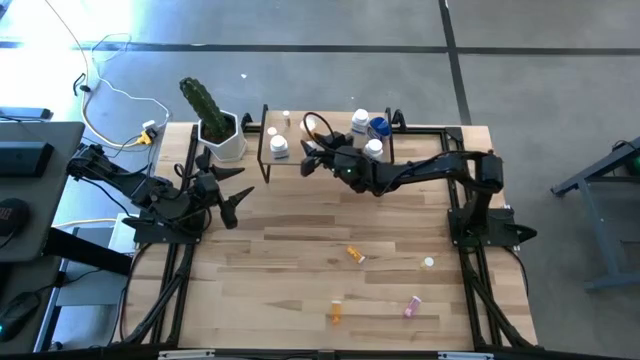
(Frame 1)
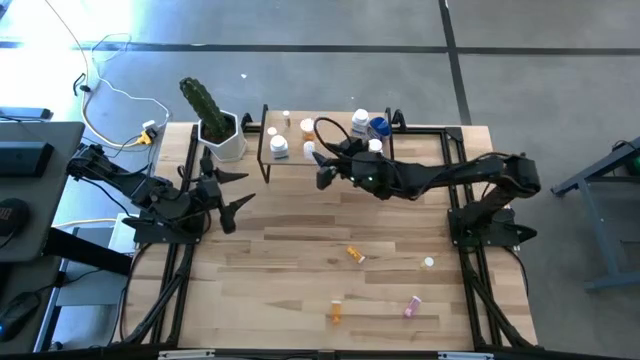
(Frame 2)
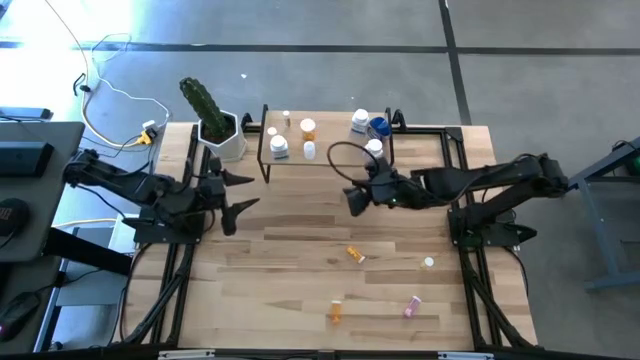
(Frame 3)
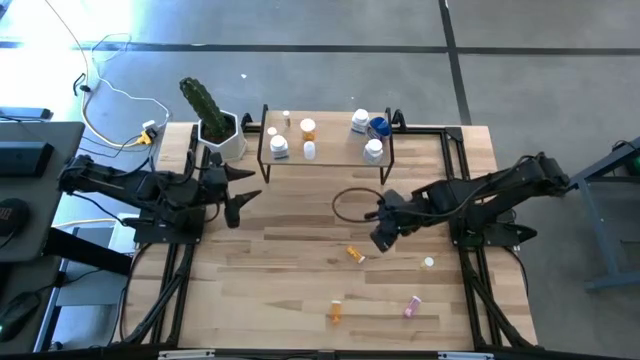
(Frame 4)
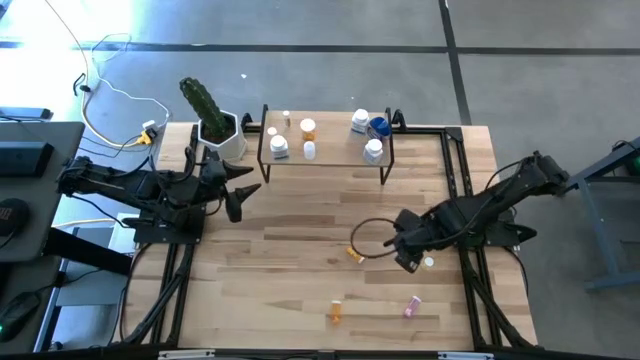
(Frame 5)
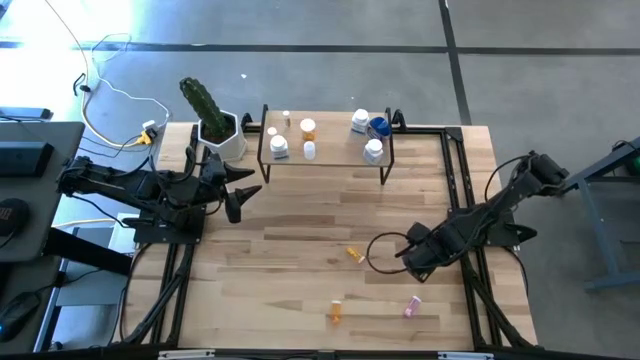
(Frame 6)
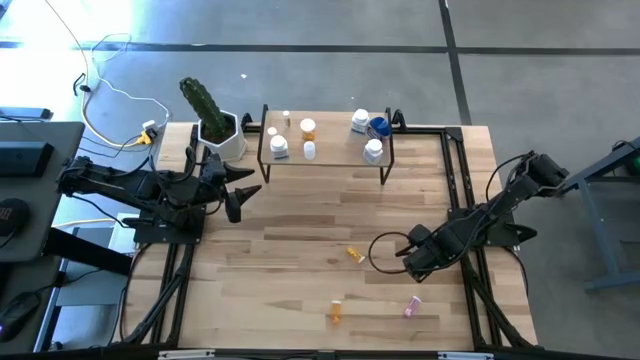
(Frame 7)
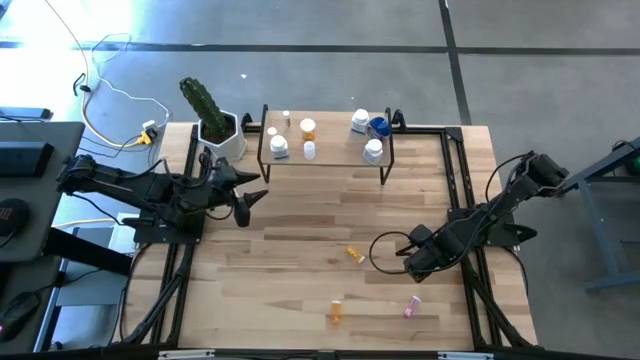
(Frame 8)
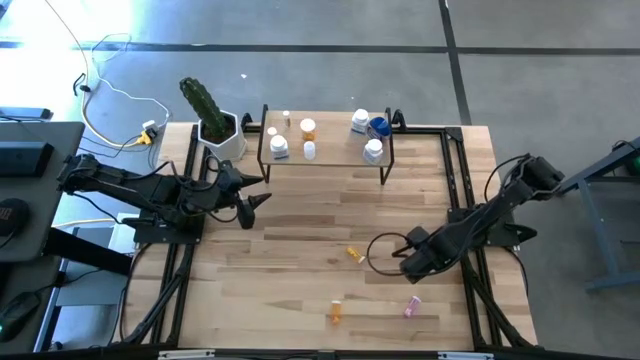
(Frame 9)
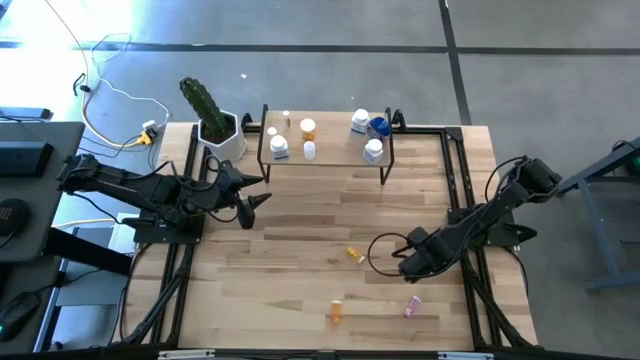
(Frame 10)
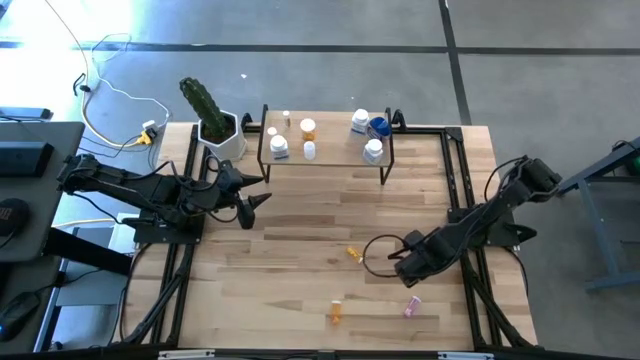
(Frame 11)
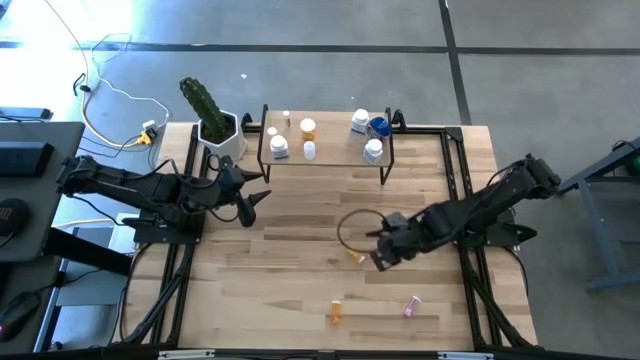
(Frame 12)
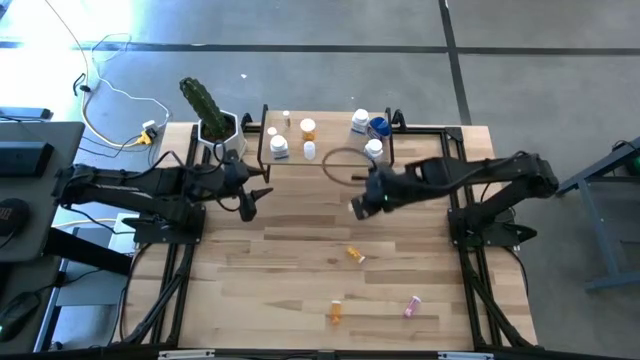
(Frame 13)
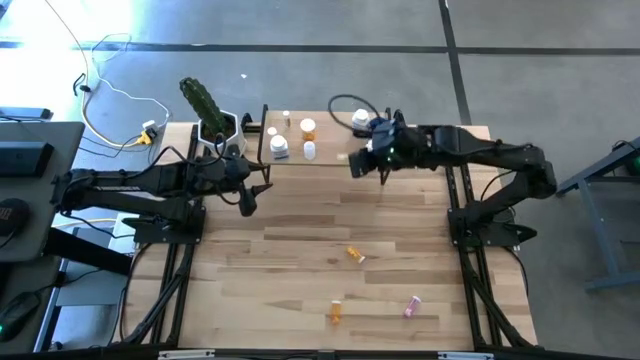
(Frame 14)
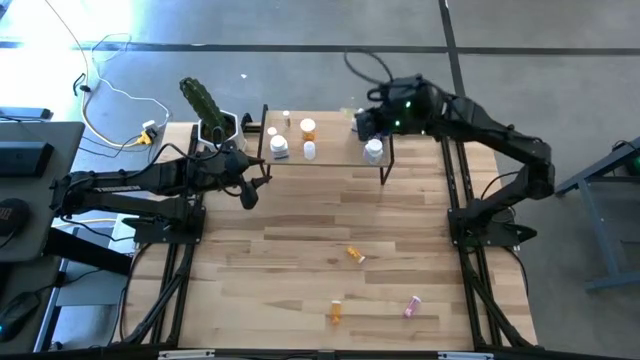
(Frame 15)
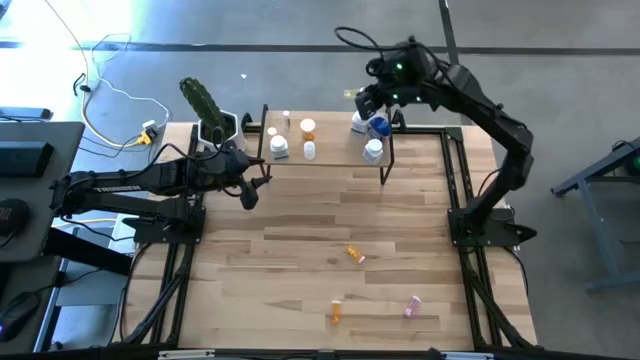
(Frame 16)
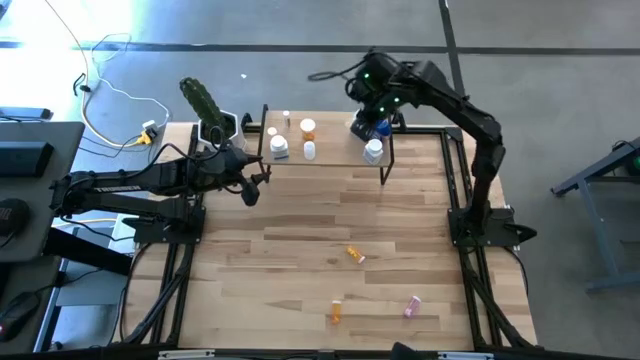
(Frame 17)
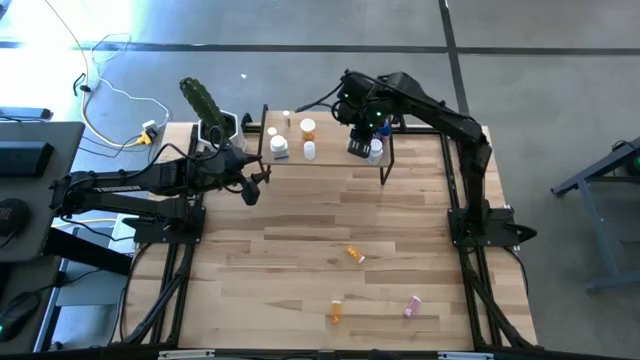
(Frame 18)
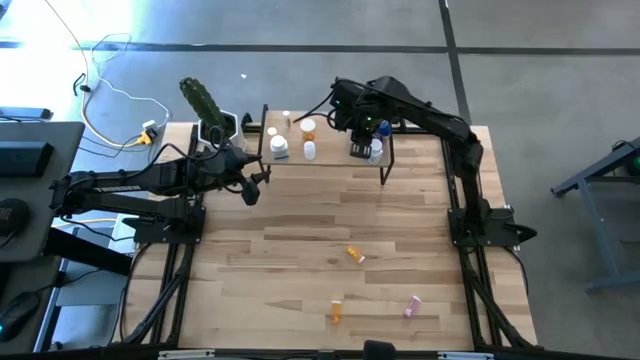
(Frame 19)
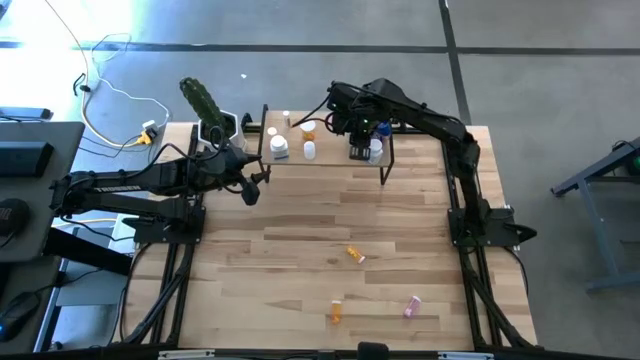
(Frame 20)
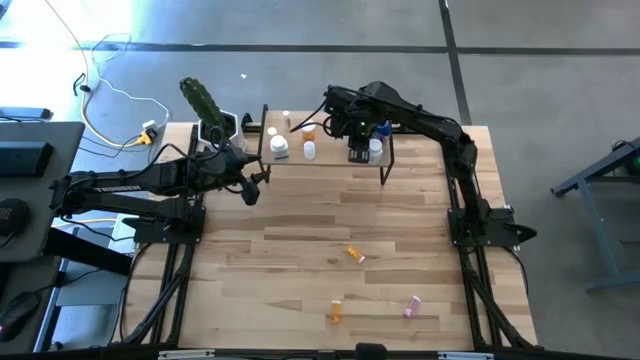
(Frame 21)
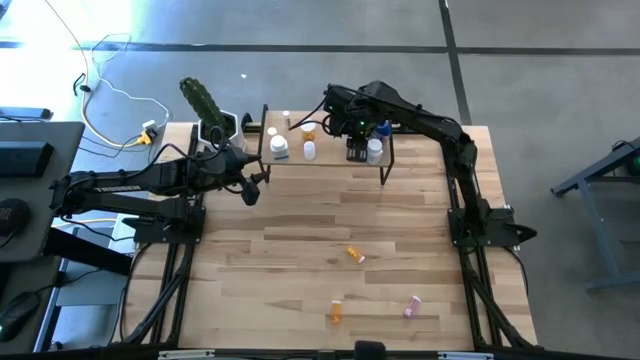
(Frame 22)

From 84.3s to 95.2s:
Task: Pick and place medicine bottles onto shelf by color
Put the yellow pill bottle on the shelf

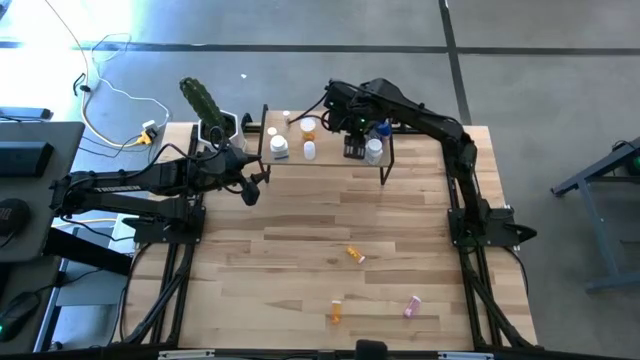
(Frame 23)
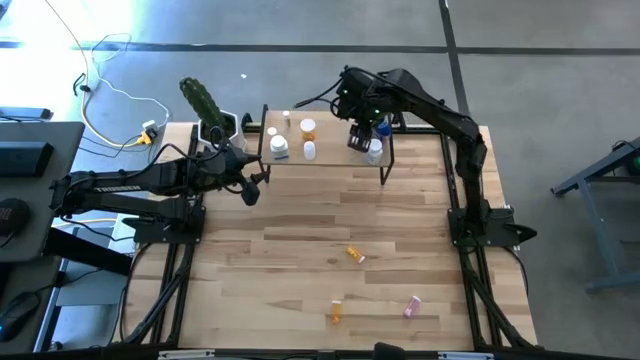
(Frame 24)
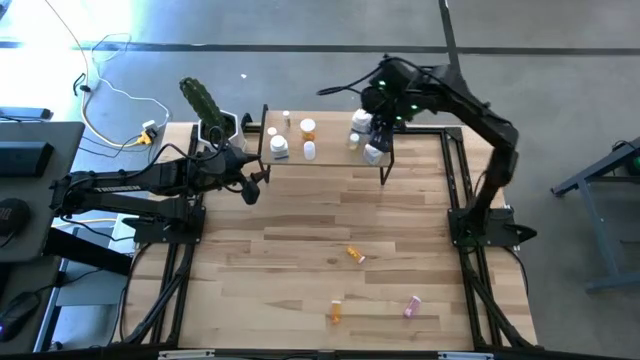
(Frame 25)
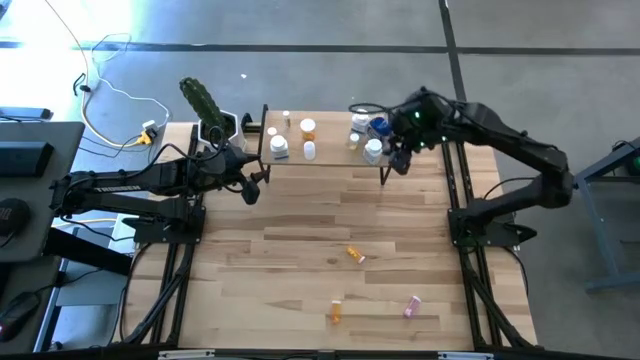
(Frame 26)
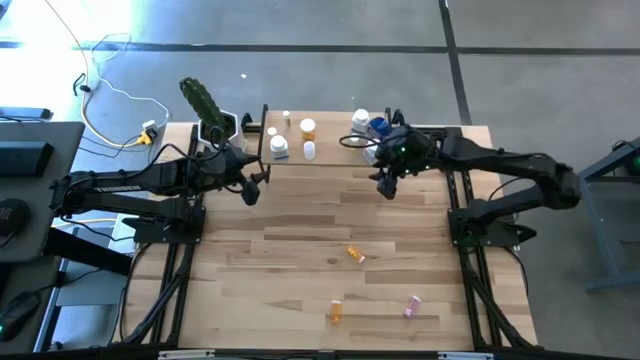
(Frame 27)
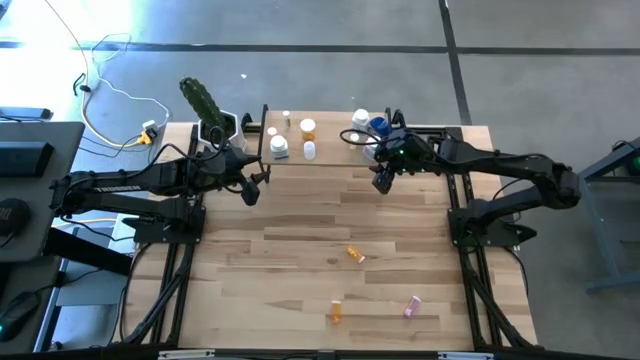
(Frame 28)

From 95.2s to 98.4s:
Adjust the blue pill bottle on the shelf

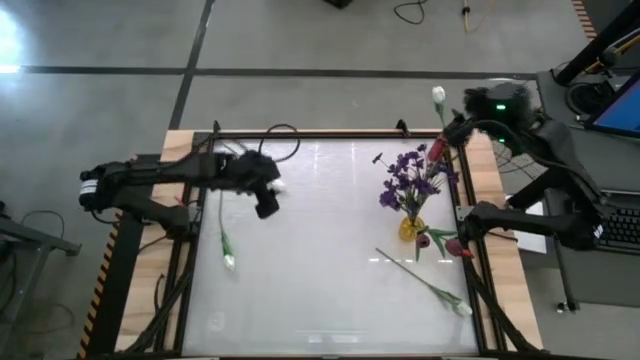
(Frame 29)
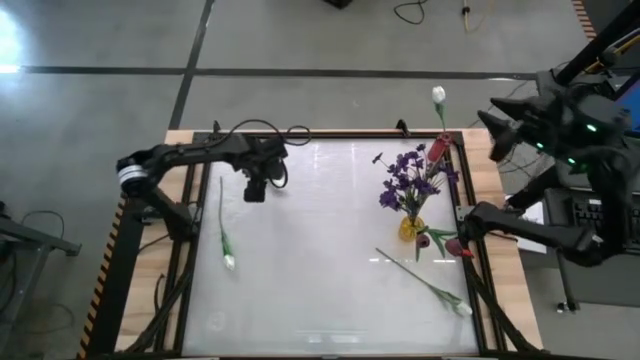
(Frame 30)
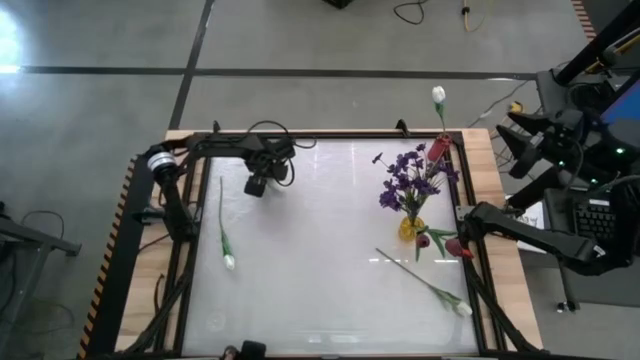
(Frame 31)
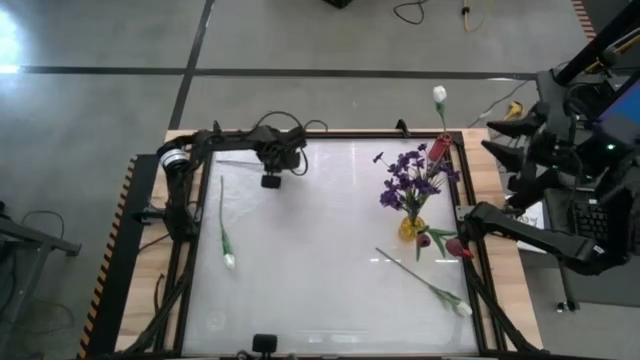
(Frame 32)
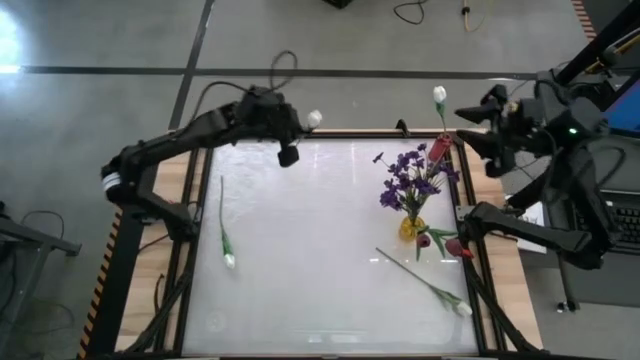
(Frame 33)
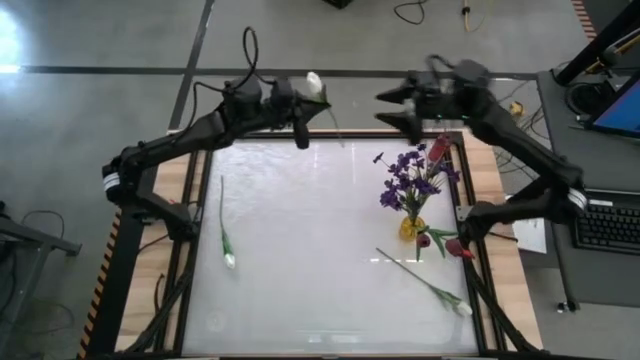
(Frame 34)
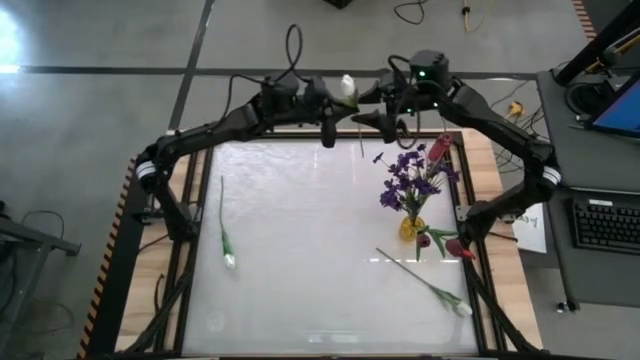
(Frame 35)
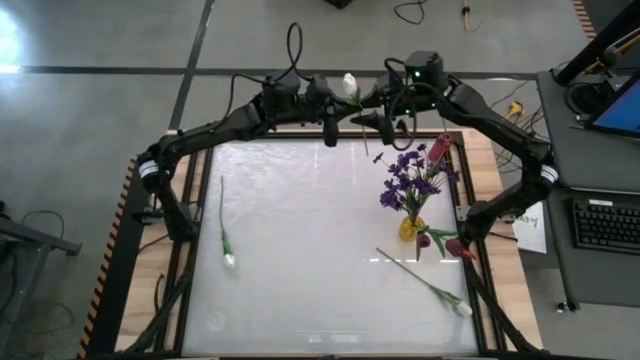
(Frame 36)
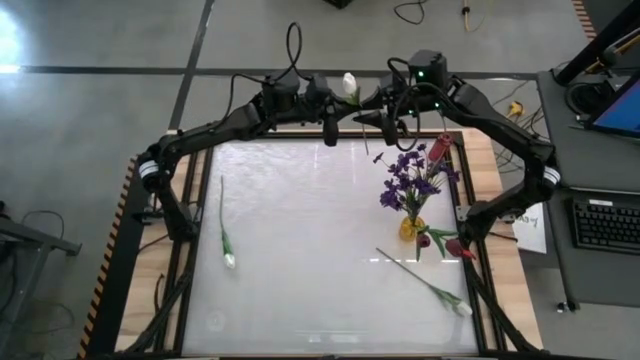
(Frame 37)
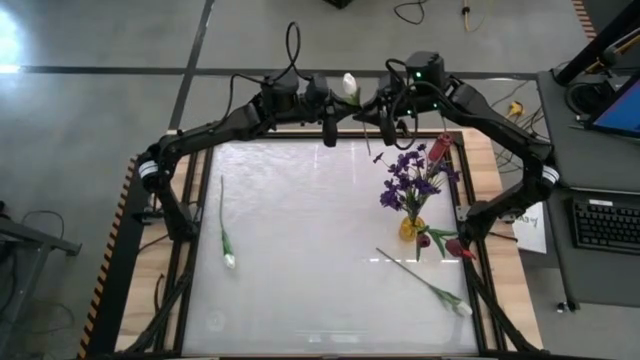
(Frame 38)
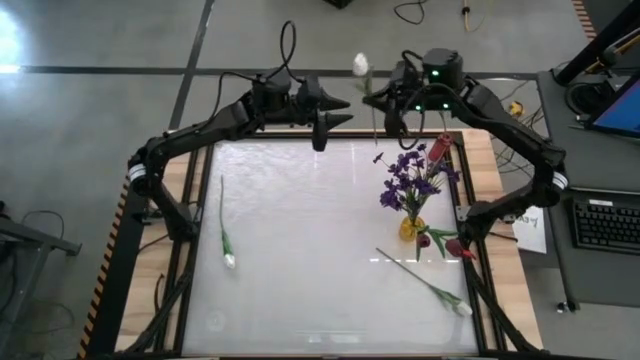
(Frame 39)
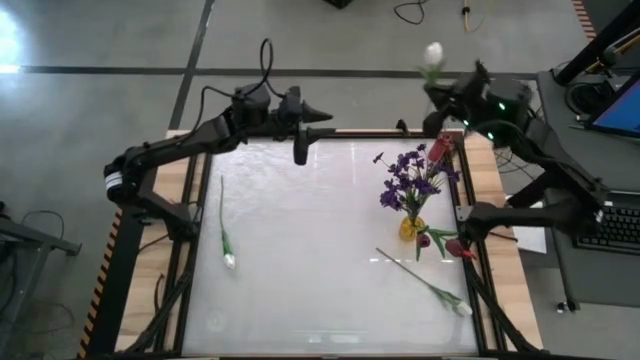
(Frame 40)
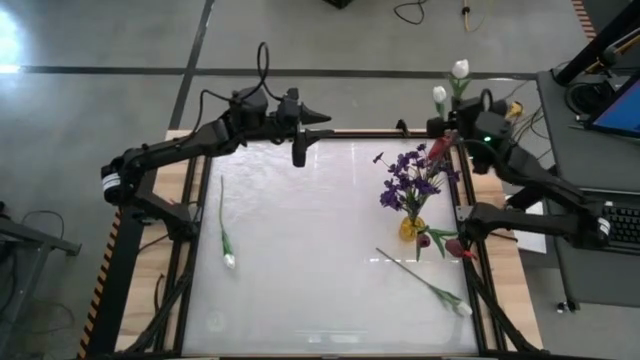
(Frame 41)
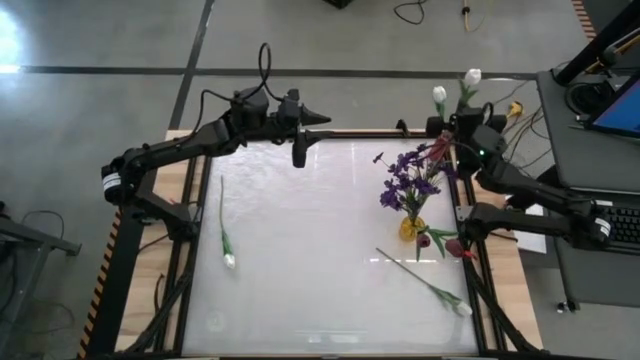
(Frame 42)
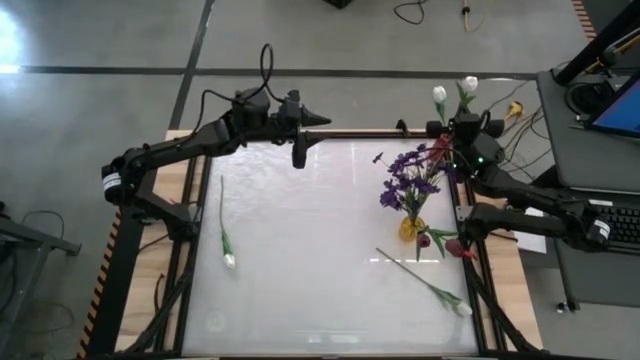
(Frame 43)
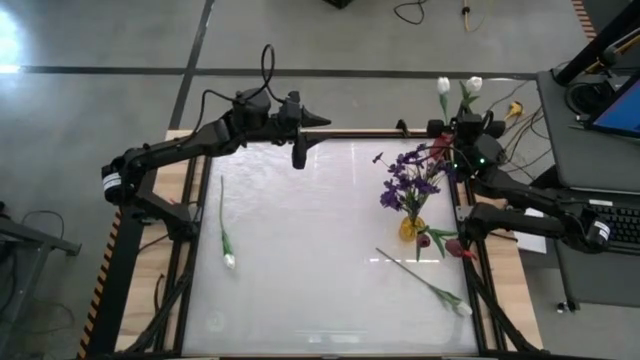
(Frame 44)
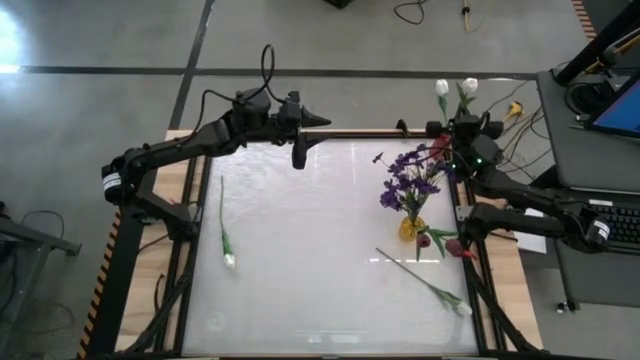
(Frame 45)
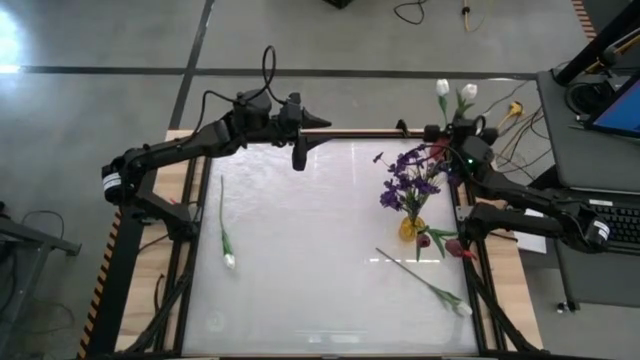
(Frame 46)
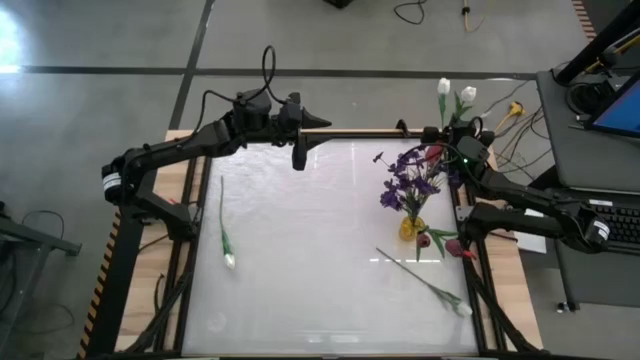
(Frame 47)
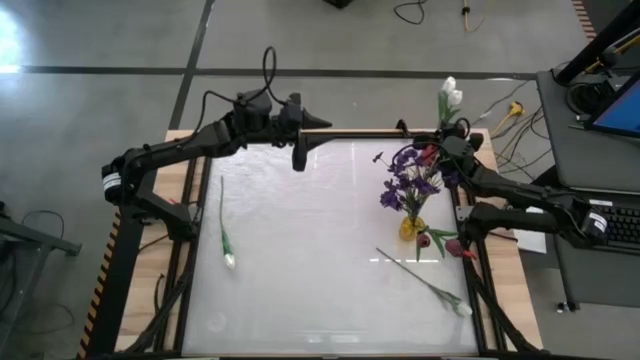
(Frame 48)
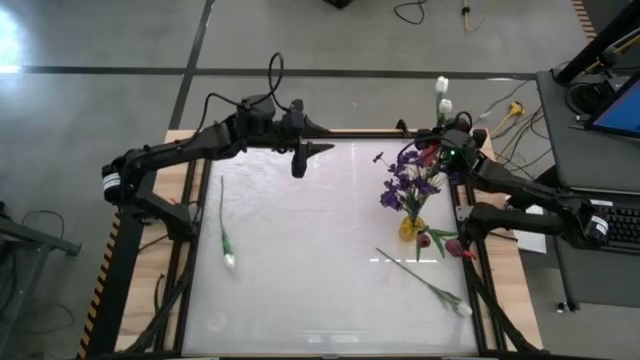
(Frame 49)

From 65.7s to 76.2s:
Task: Sort flowers into vase by color
Put the top white flower into the red vase
